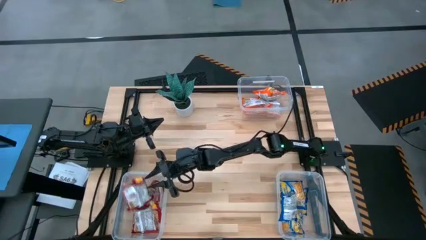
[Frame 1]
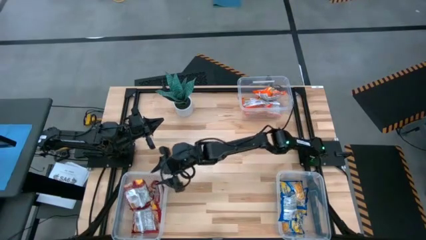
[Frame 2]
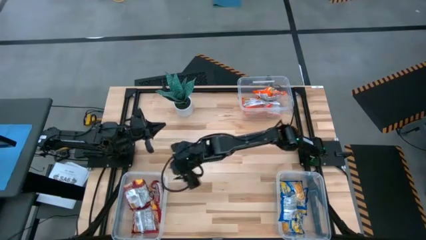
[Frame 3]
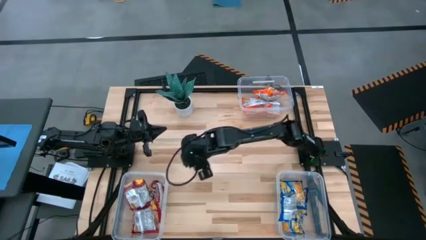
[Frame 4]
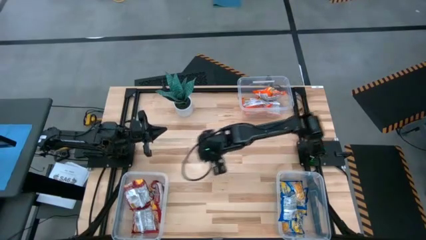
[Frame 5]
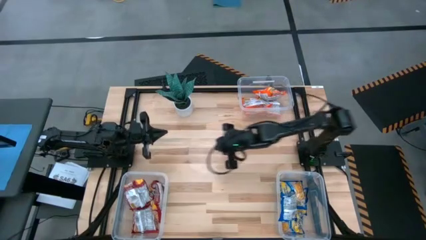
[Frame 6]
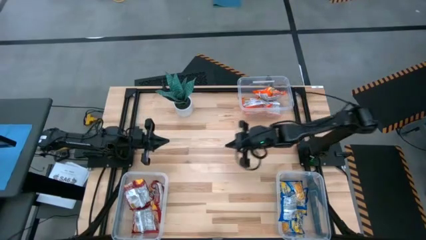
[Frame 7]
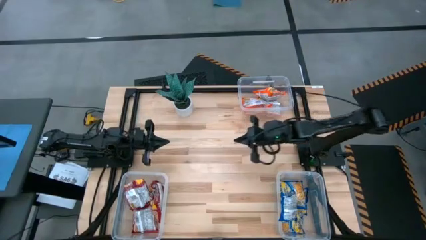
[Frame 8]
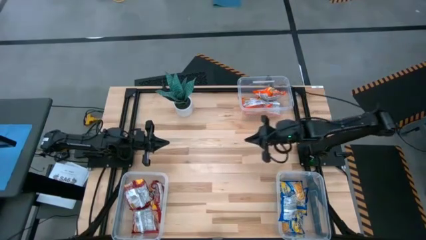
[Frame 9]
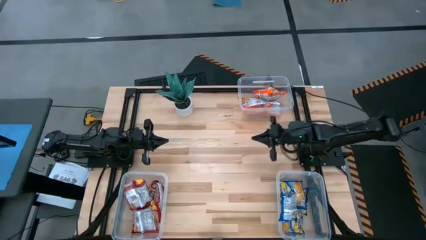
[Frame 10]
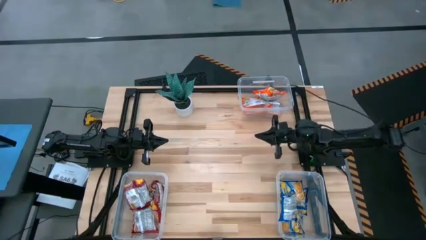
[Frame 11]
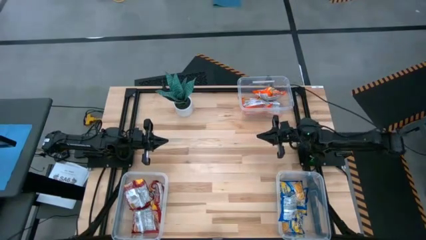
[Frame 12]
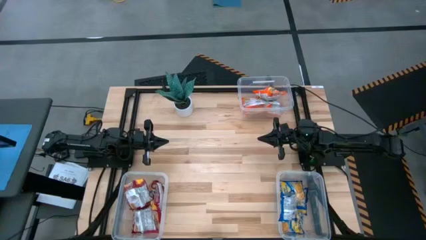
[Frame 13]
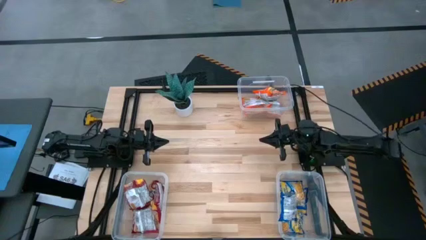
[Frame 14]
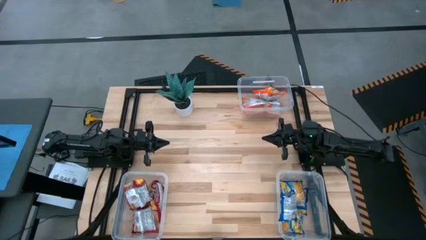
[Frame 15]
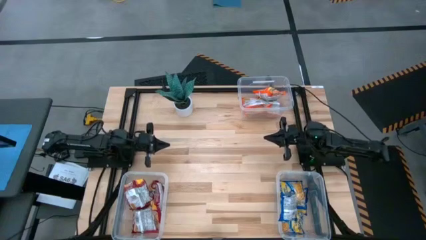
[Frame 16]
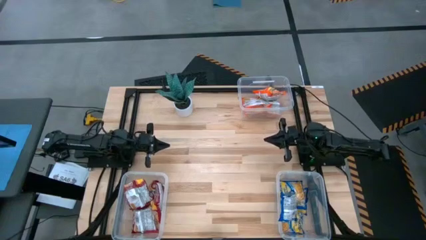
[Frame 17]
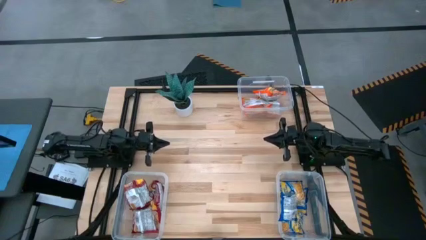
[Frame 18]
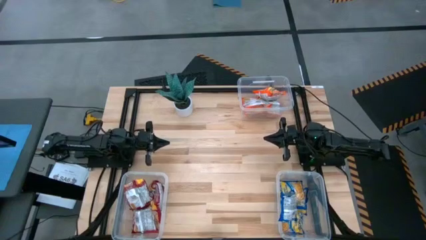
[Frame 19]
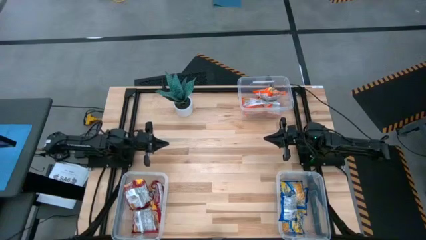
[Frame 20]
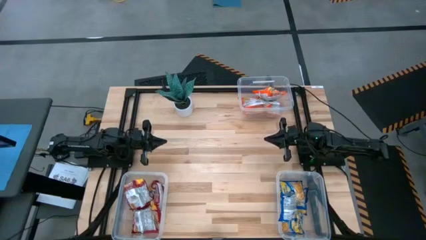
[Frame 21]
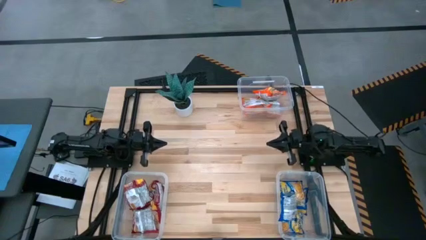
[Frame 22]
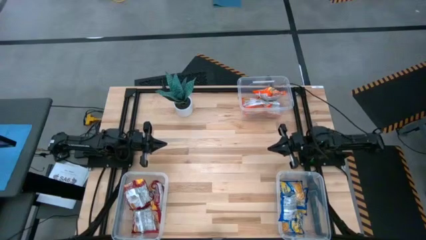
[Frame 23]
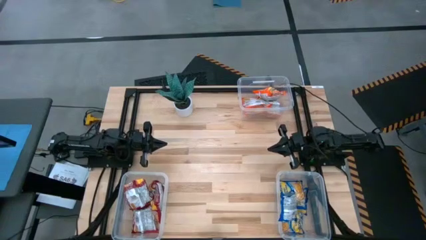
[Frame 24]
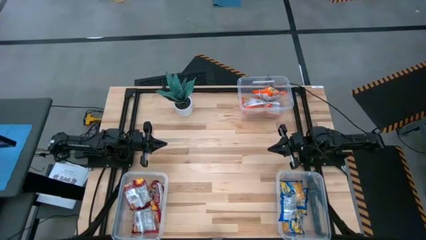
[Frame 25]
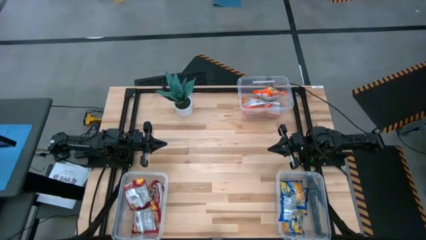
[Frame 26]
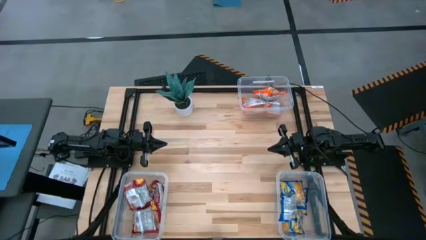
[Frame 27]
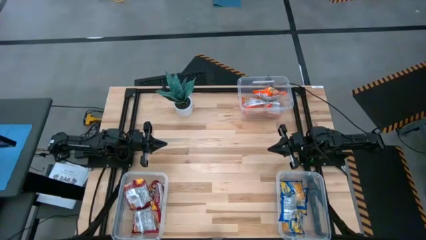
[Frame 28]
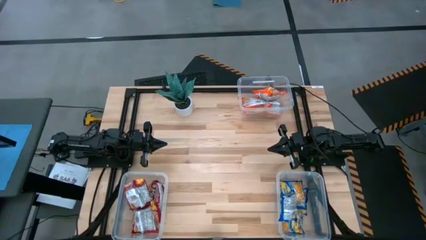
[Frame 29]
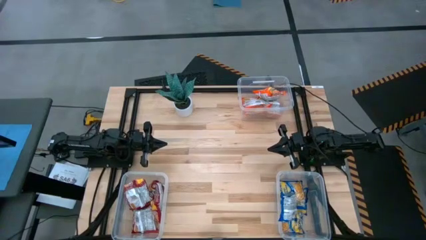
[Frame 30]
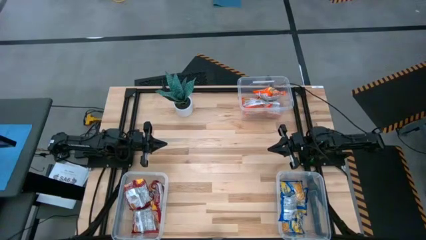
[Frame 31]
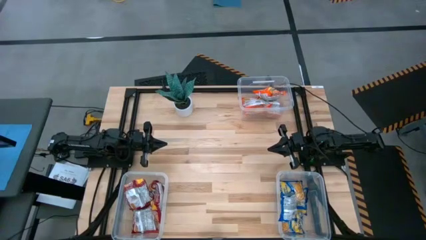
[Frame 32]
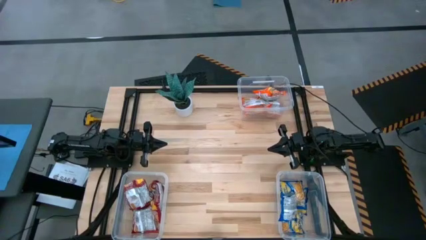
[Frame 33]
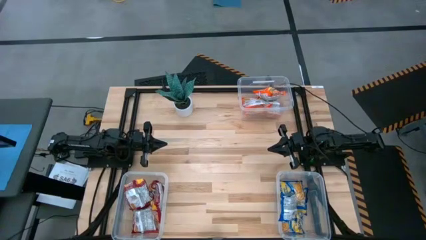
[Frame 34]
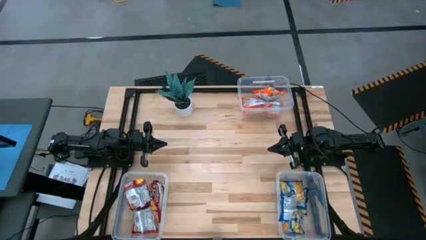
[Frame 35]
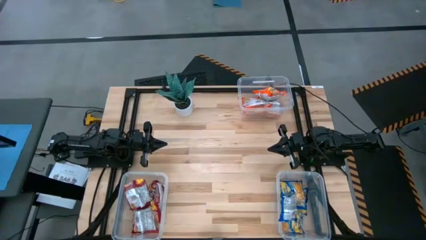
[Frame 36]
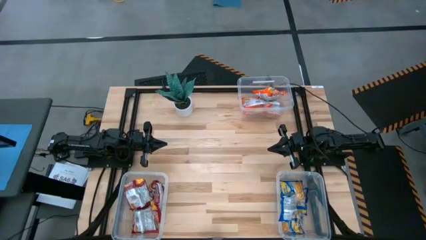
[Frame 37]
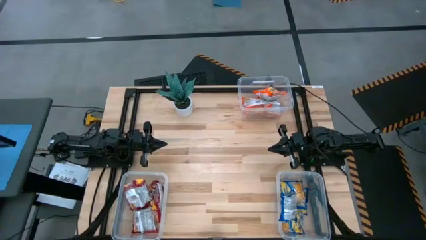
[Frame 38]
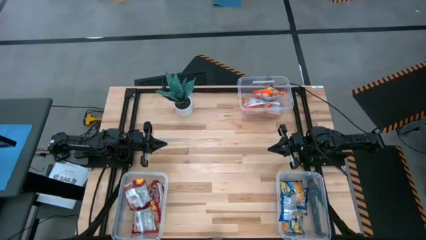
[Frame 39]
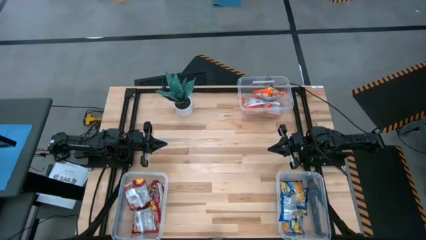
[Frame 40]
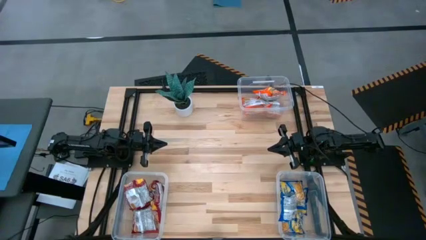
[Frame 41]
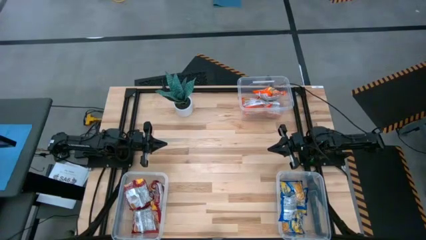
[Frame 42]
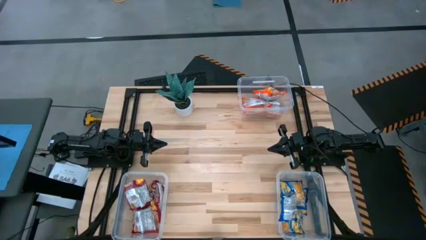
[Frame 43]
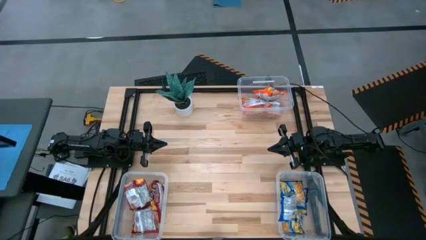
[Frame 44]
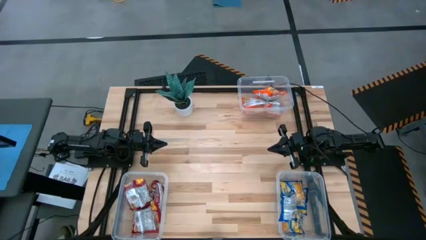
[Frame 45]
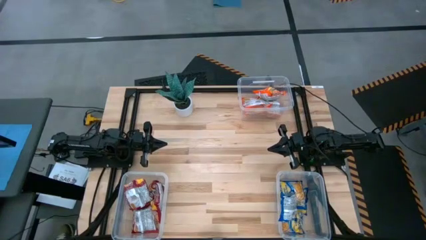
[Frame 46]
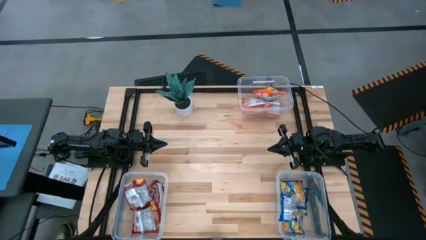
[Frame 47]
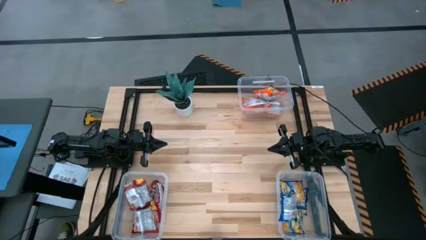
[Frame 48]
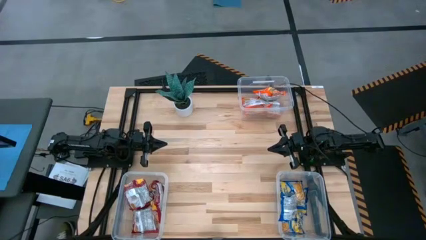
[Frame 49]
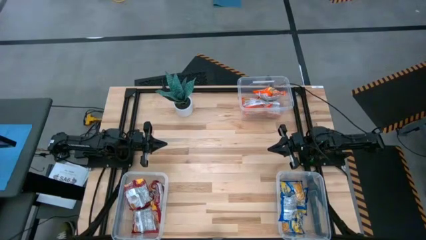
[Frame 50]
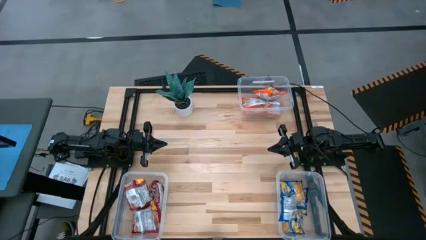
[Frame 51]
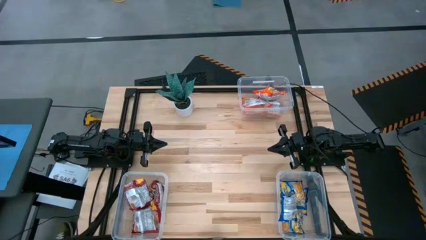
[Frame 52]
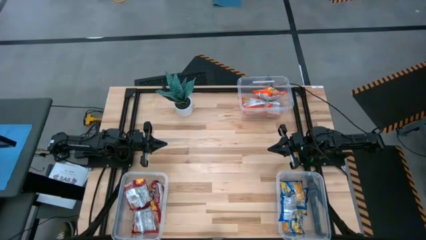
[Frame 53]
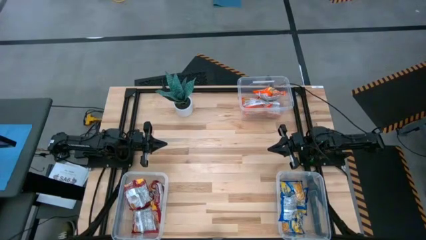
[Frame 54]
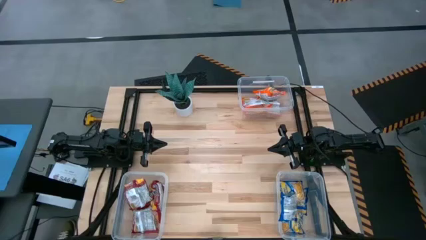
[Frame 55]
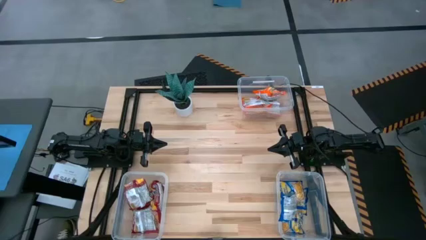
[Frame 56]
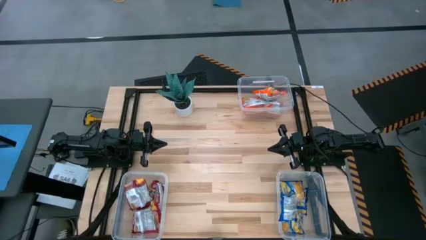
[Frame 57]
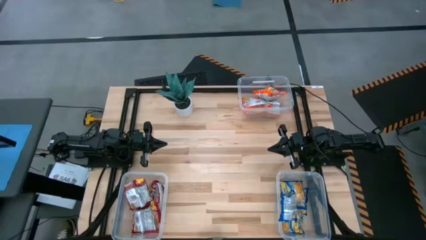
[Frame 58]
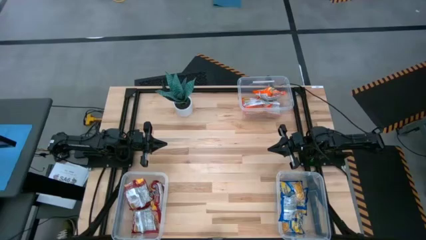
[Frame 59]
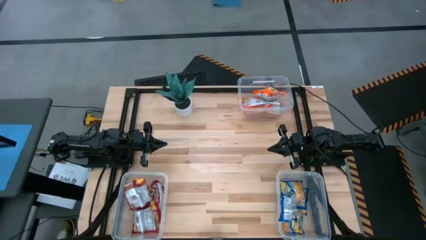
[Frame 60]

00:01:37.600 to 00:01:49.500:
Task: Sort Maruchan noodles
Return to Home Position
